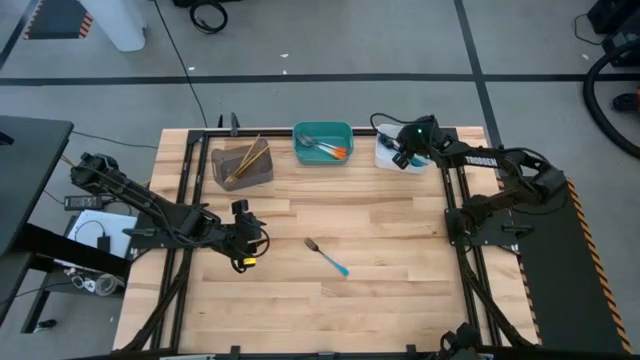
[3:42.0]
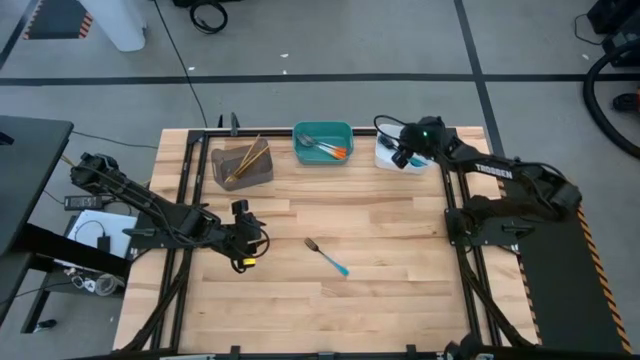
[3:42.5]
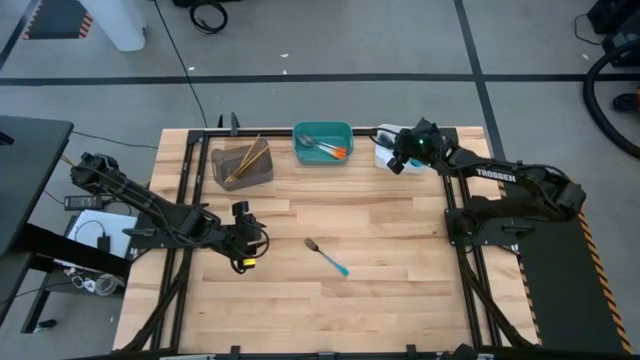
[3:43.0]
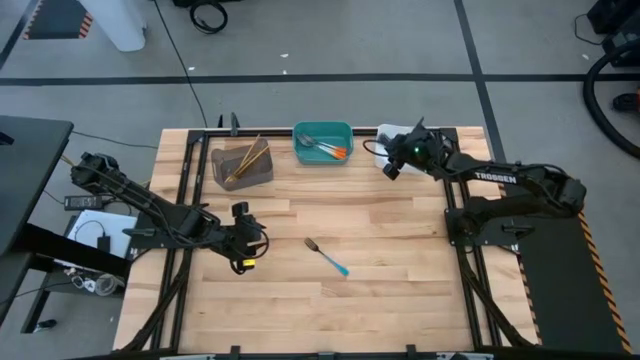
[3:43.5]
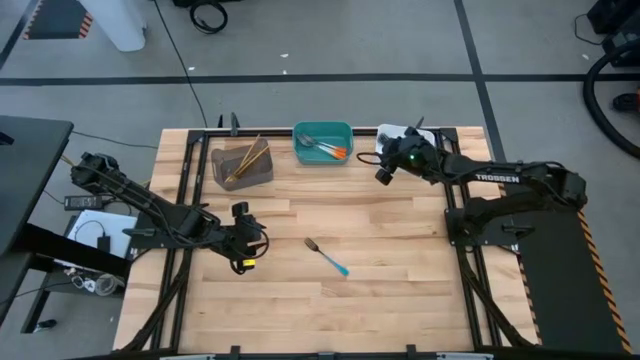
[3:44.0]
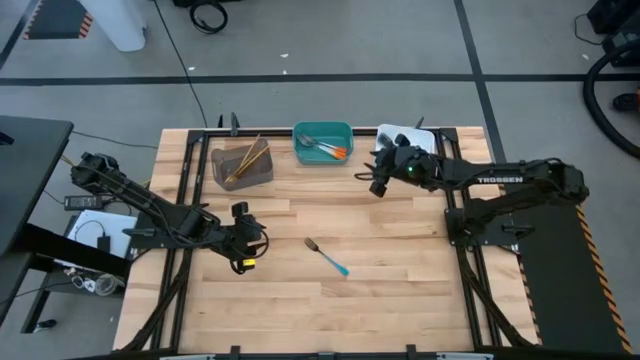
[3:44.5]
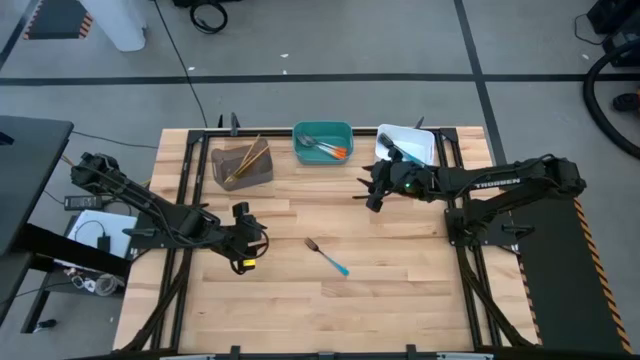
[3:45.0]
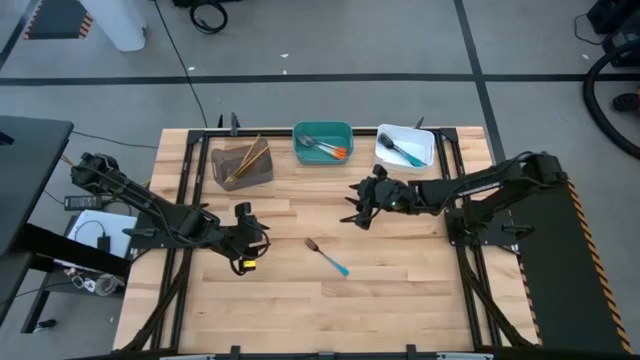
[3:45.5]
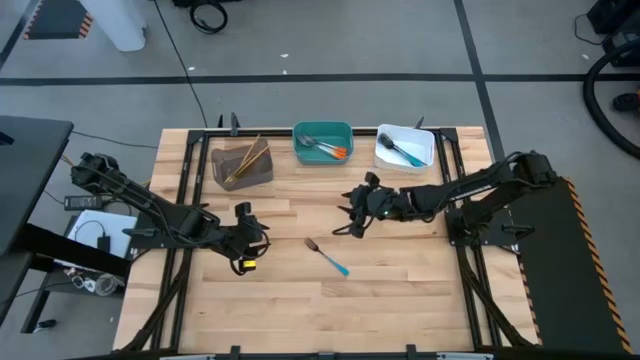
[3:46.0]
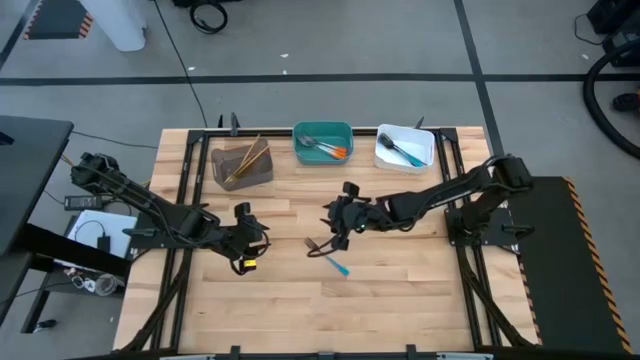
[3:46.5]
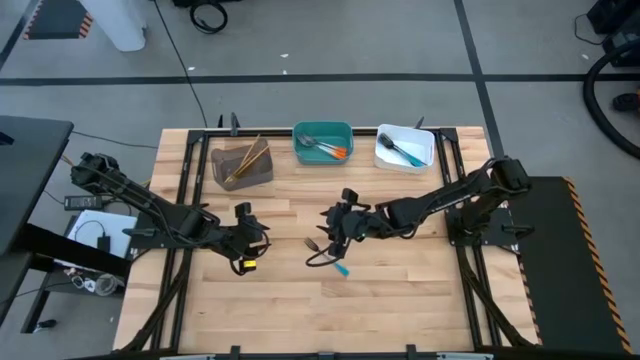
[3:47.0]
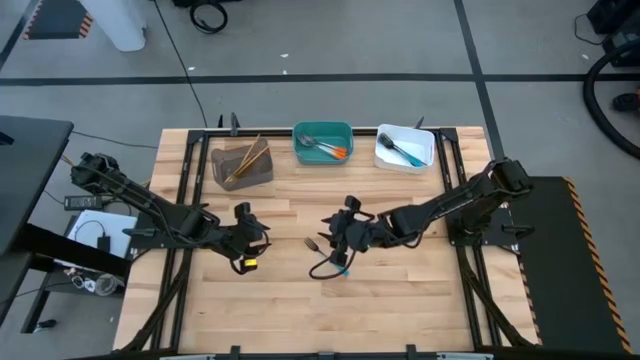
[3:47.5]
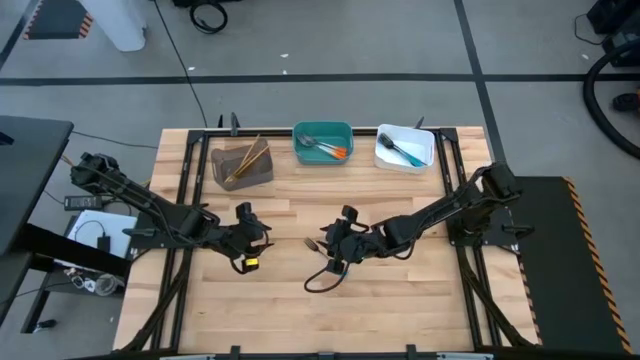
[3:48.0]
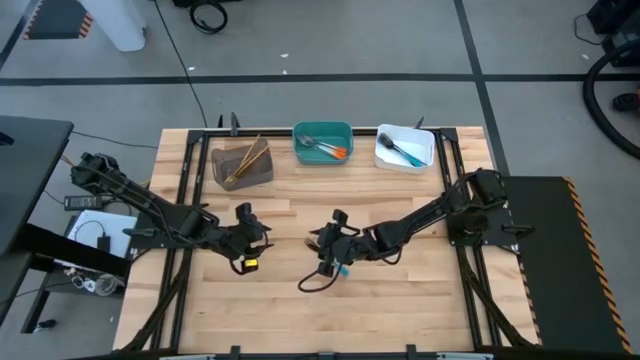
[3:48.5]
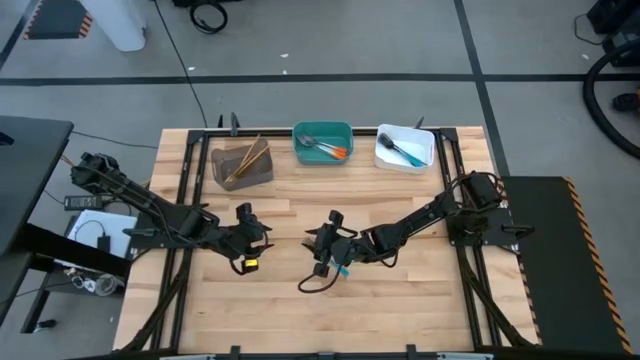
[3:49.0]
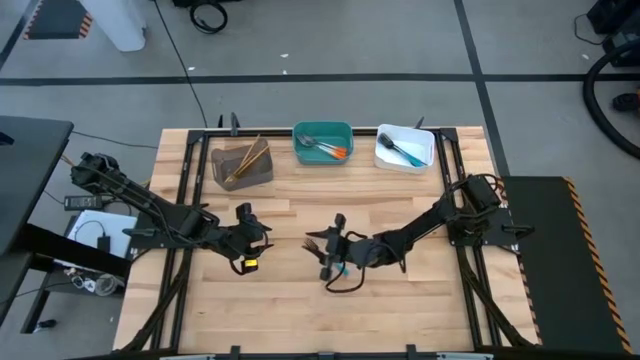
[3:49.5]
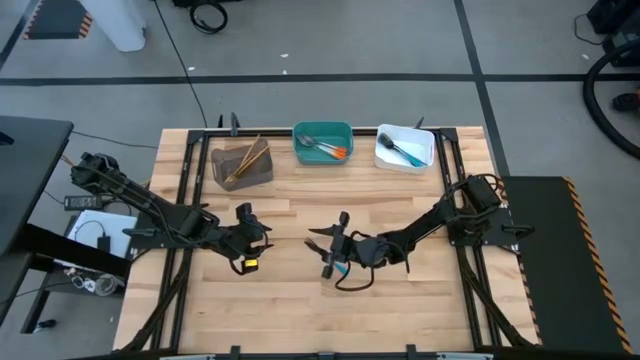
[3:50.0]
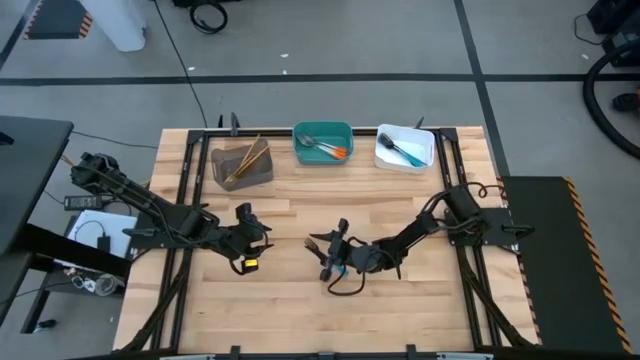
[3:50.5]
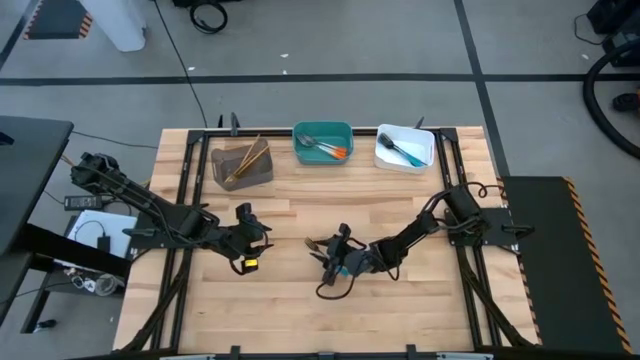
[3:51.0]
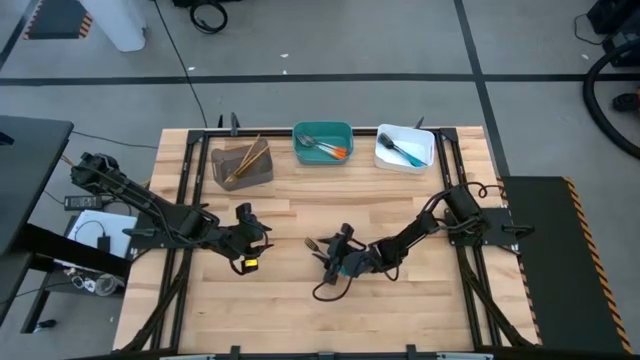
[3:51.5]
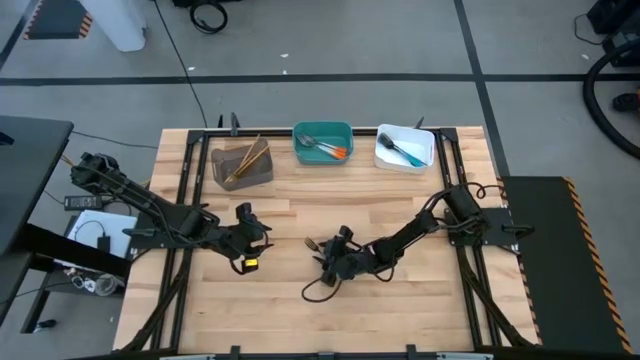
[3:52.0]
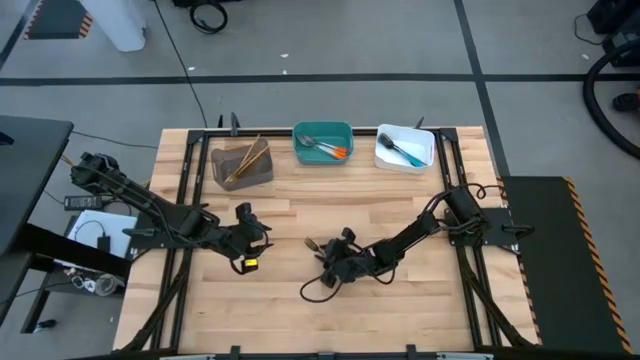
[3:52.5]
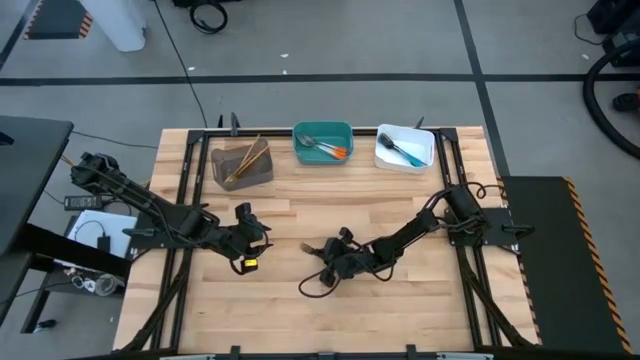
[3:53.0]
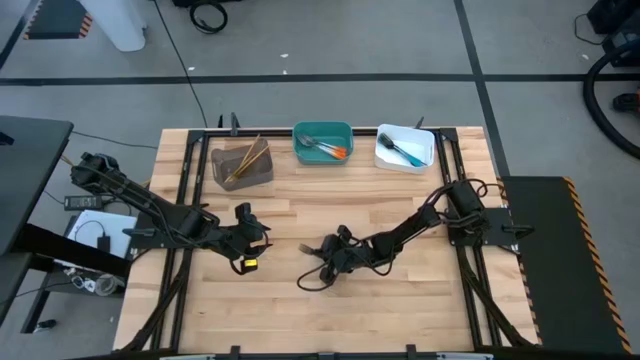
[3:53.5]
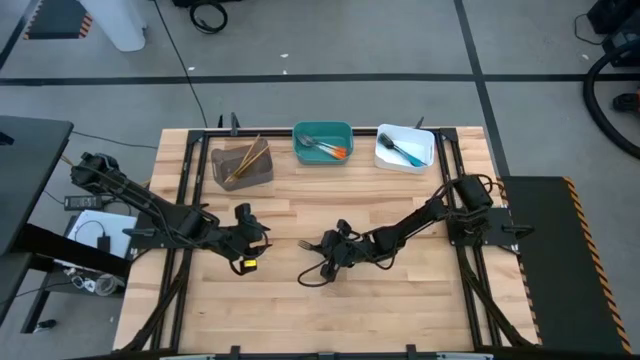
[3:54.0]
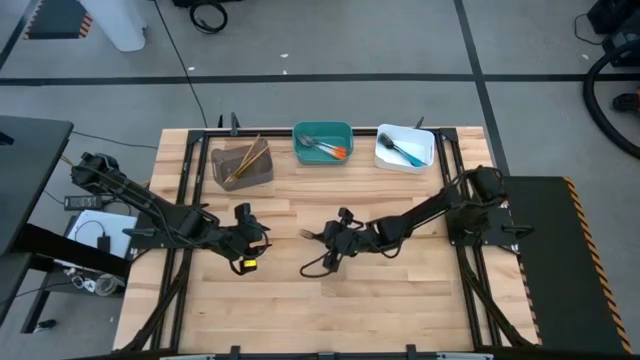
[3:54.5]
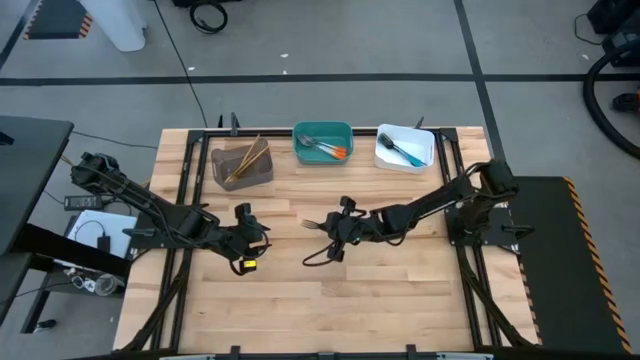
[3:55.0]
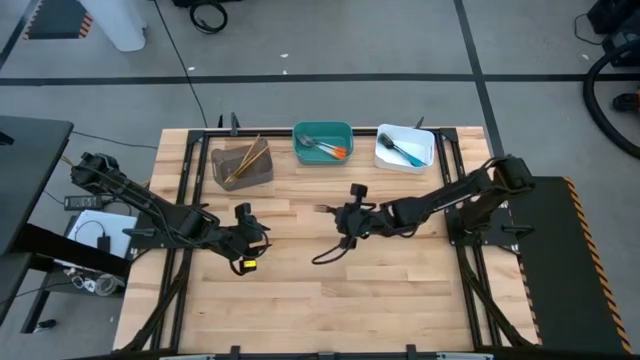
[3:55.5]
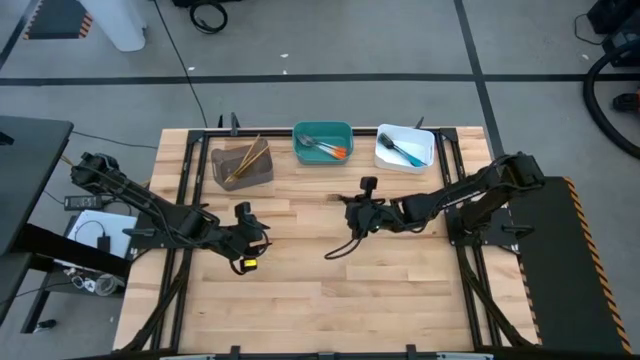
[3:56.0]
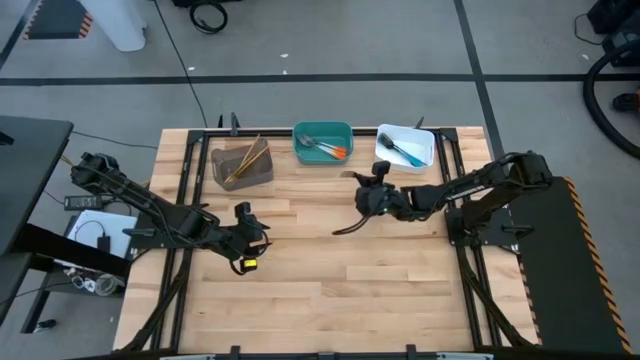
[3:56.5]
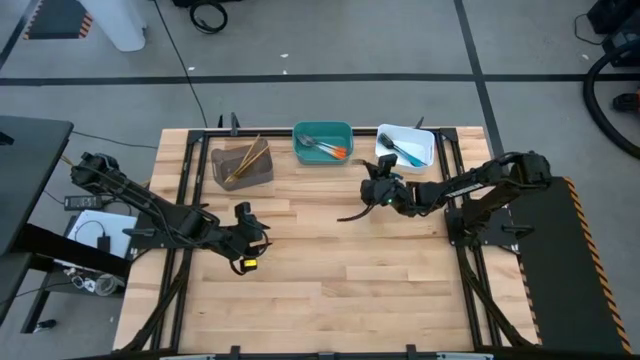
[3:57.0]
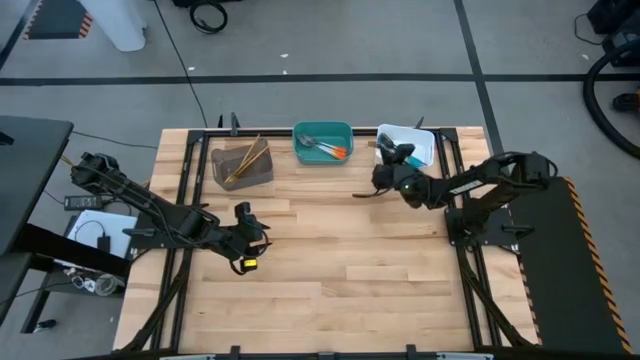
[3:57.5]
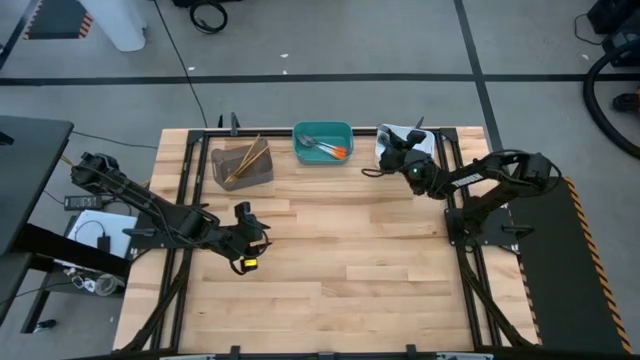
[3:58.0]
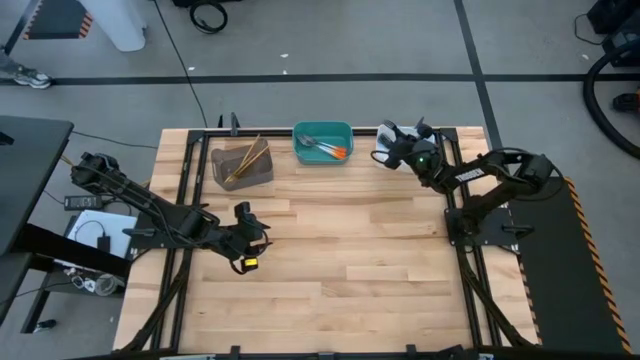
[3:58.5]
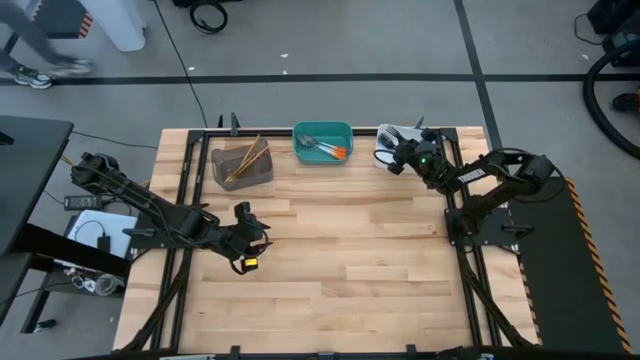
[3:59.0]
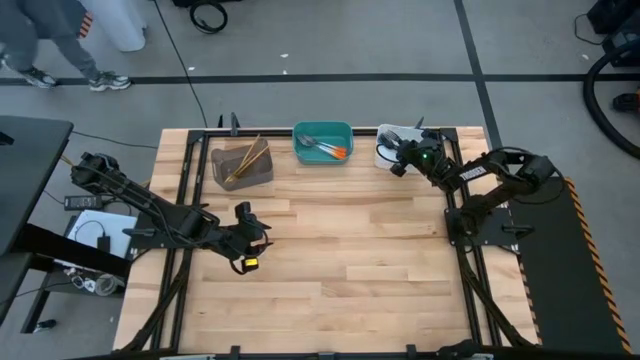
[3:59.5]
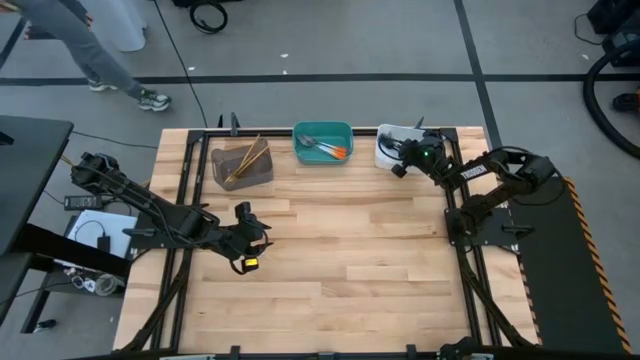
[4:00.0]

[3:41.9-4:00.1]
Task: Sort silverware by color (type)
Put the blue fork into the white bin

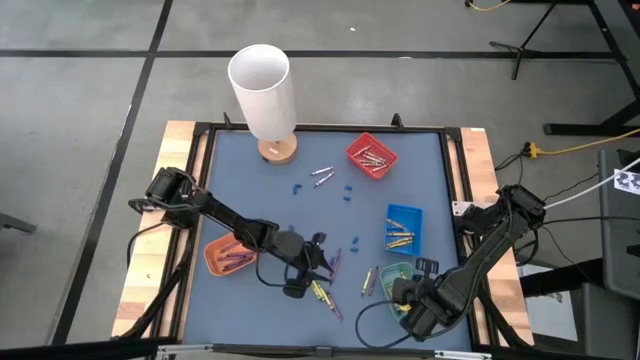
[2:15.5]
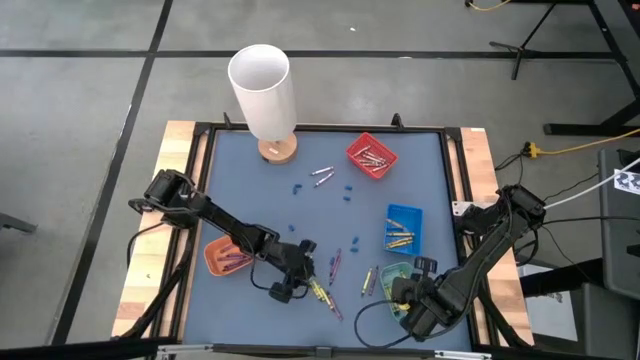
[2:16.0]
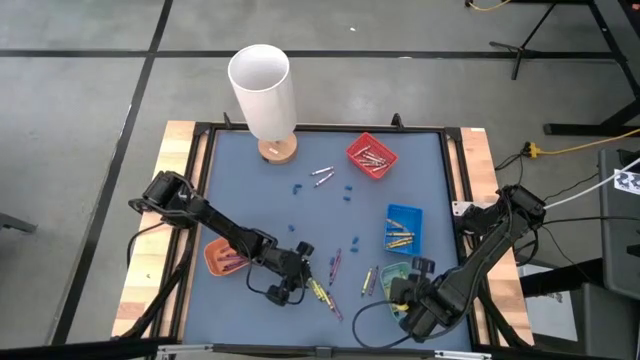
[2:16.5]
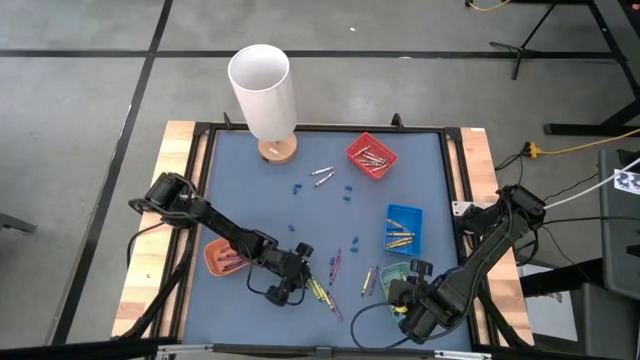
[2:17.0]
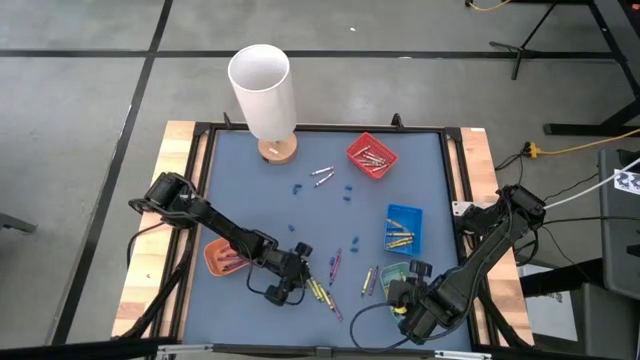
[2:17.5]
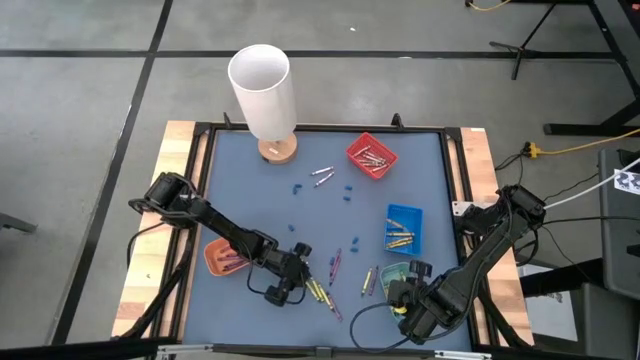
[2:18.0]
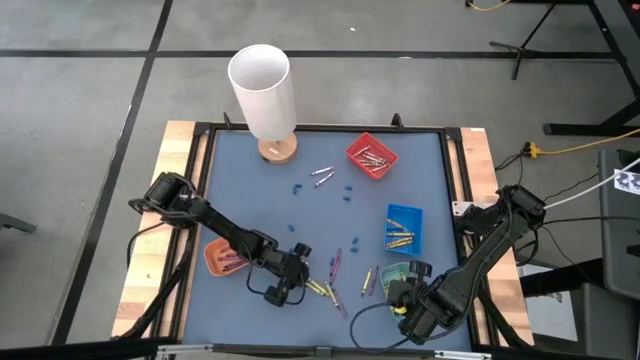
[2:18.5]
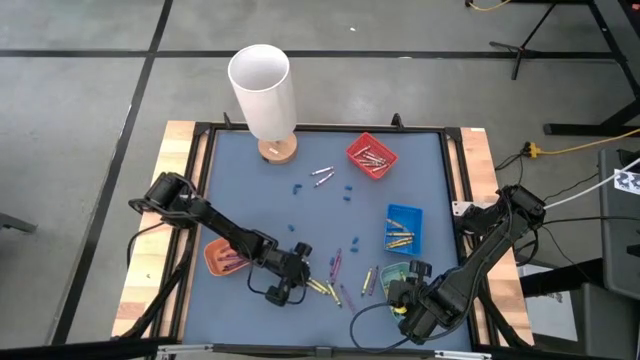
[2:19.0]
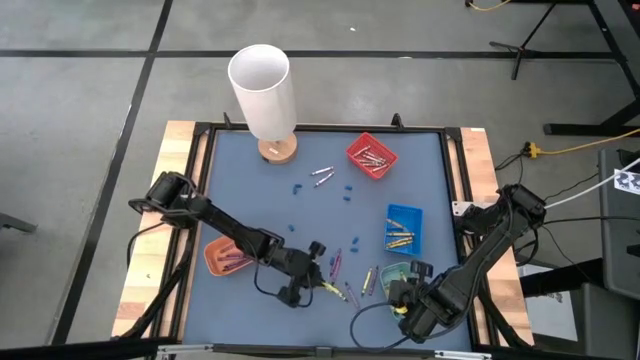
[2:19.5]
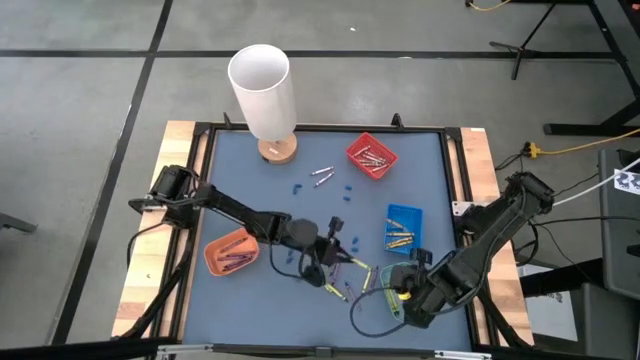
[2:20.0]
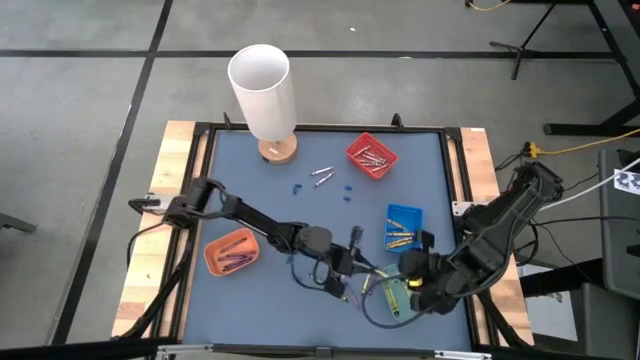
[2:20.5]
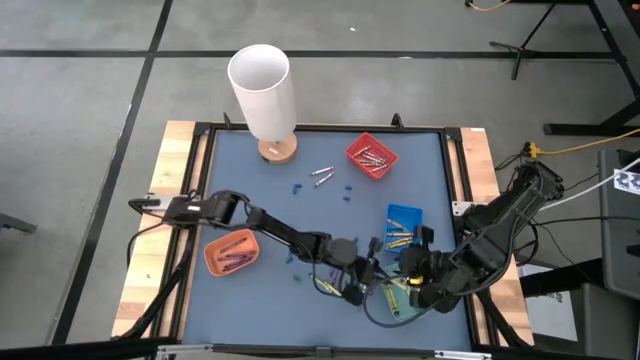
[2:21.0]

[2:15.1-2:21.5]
Task: Sort crayons
Put the green crayon into the green bin
